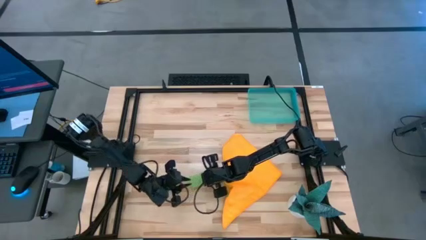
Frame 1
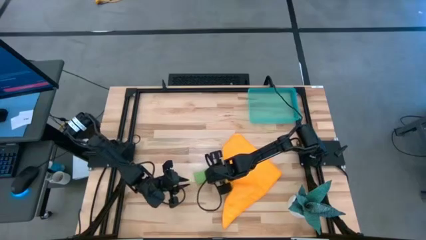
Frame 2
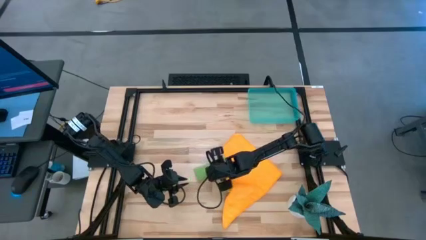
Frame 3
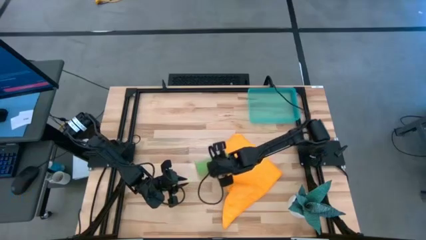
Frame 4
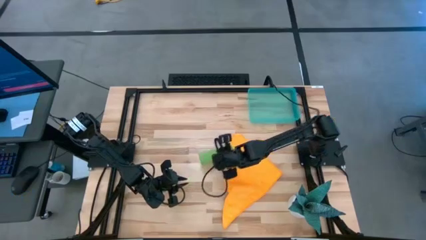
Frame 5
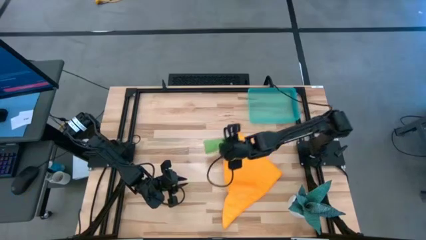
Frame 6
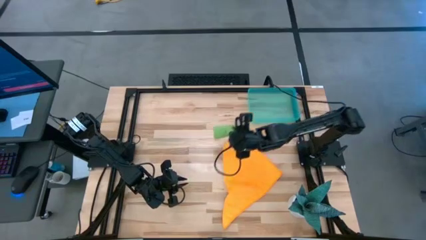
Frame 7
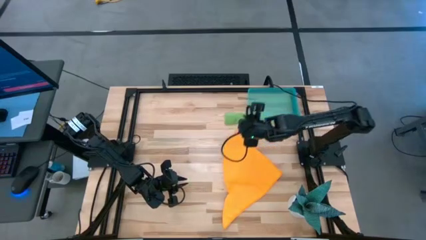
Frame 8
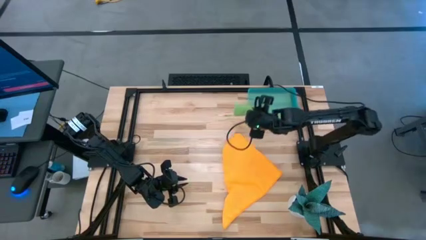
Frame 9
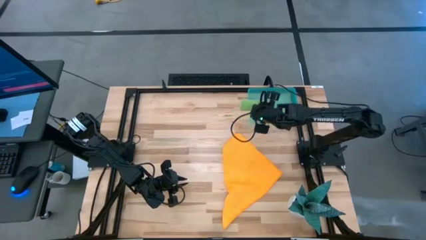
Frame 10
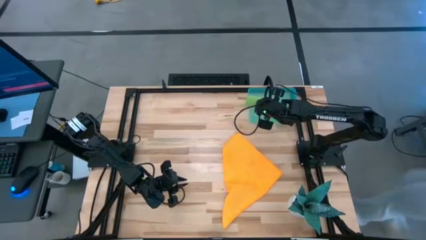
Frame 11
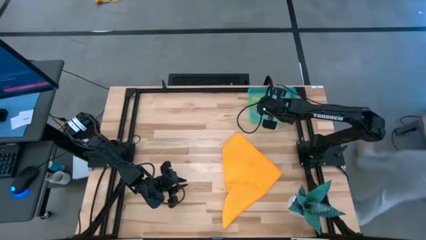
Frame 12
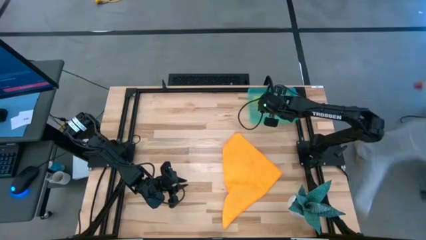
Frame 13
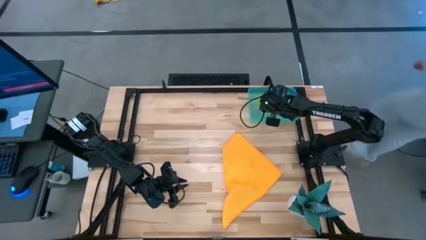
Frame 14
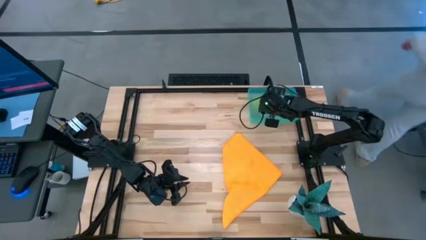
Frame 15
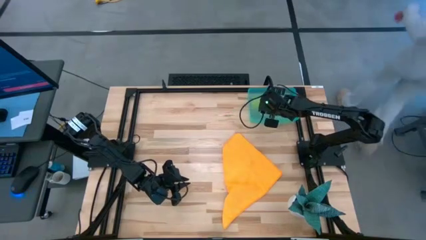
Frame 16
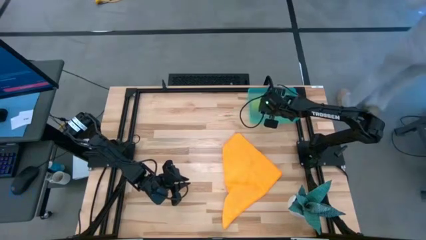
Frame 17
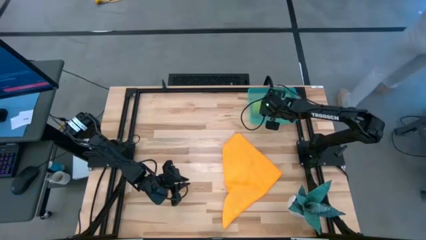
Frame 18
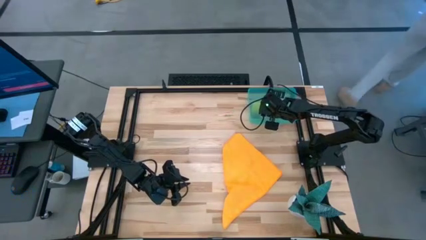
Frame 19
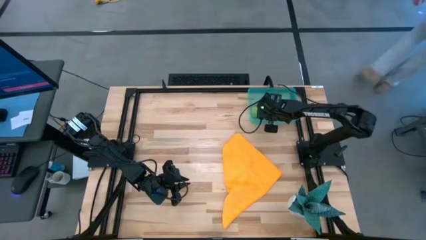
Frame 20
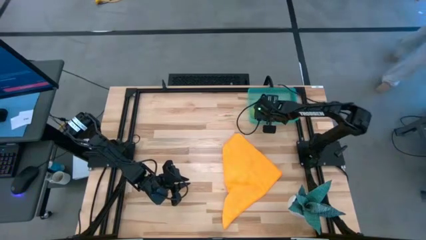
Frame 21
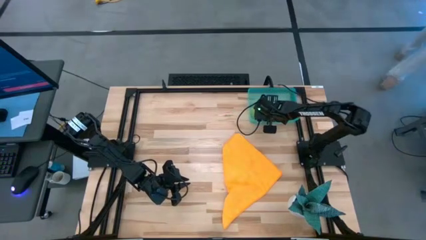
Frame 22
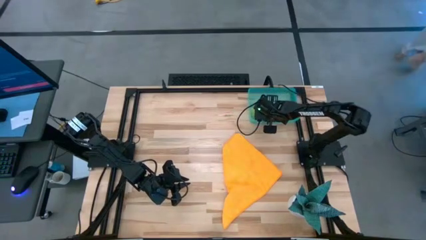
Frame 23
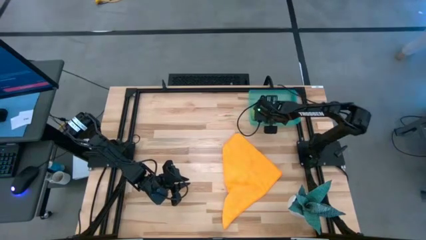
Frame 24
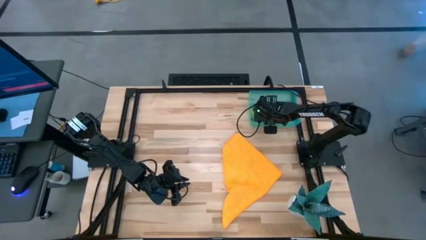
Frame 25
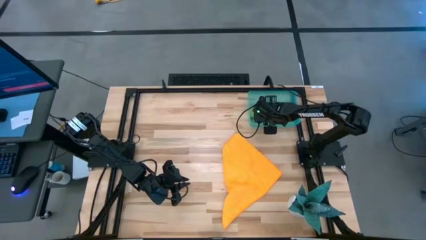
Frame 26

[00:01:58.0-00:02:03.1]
Task: Roll microfiber towels into tight, uniform cylinder then place into a basket
Put the green microfiber towel into the blue bin

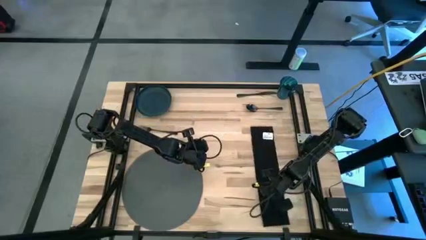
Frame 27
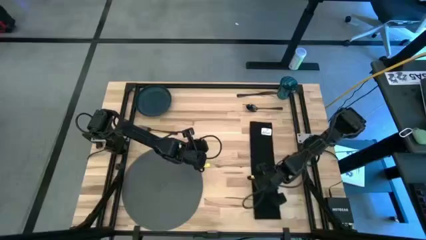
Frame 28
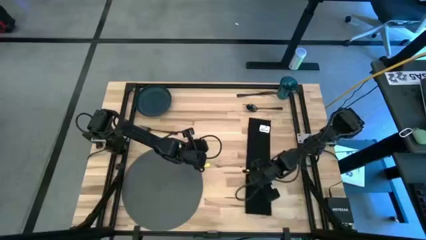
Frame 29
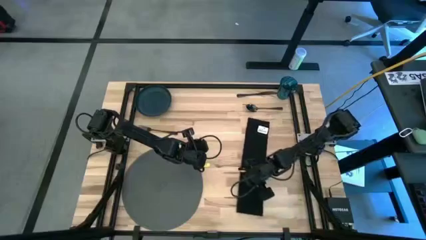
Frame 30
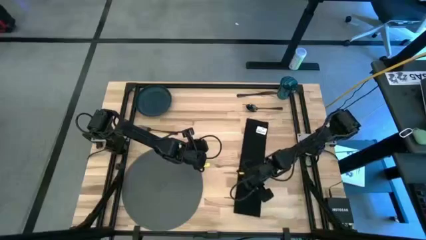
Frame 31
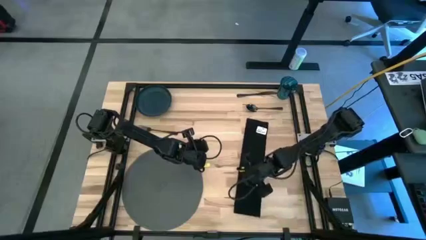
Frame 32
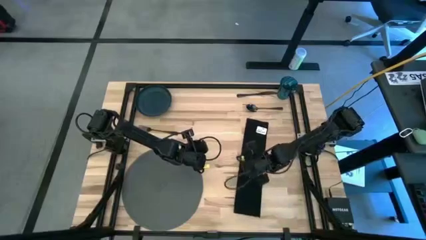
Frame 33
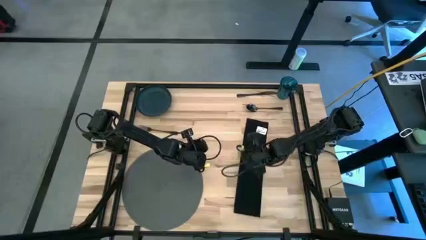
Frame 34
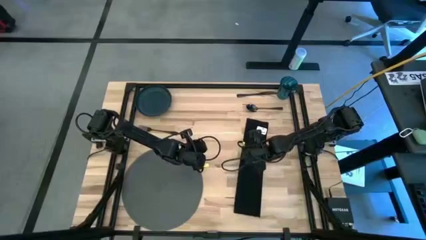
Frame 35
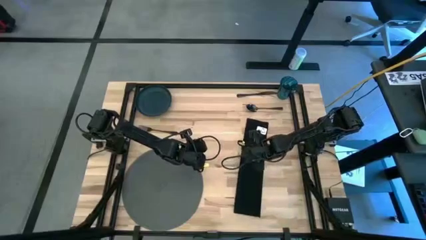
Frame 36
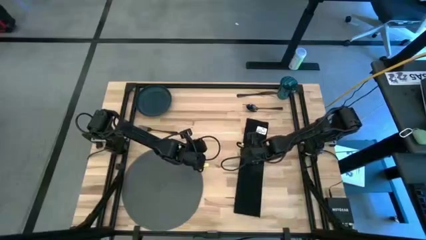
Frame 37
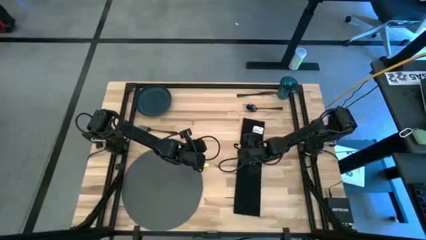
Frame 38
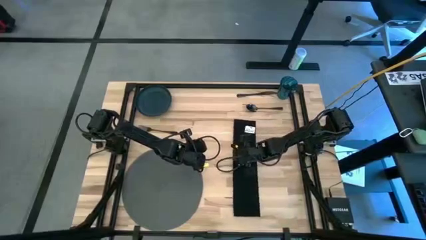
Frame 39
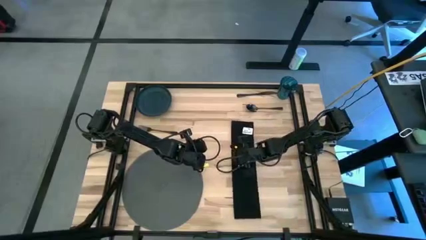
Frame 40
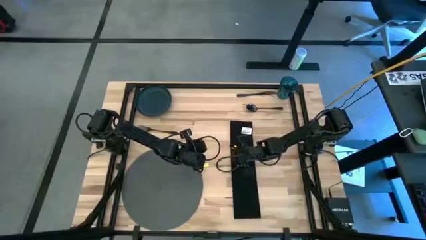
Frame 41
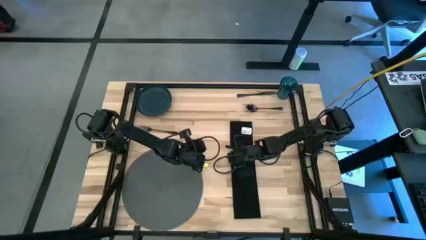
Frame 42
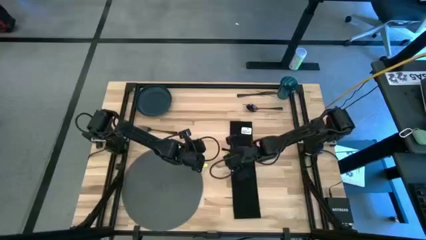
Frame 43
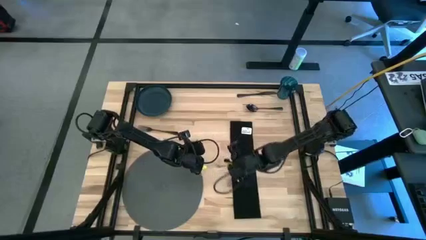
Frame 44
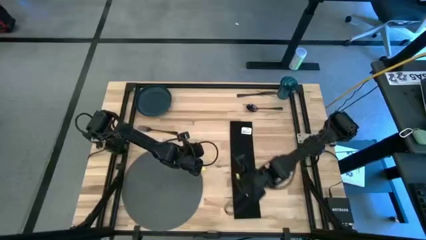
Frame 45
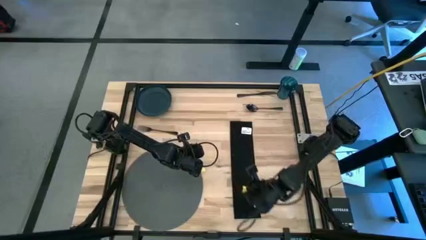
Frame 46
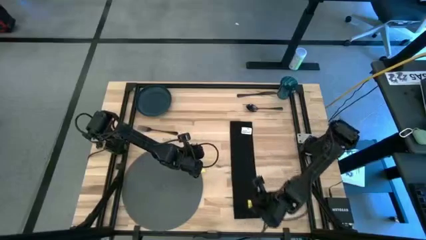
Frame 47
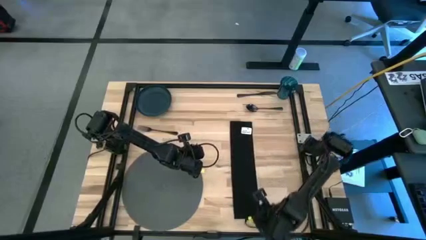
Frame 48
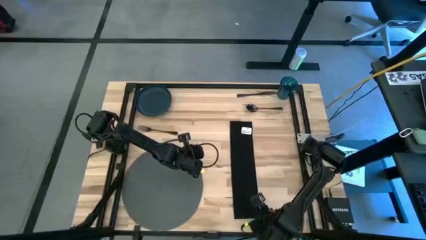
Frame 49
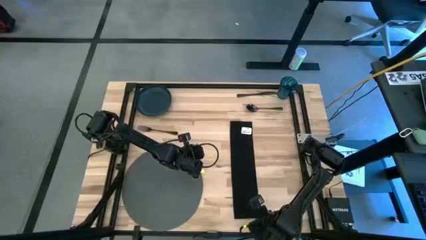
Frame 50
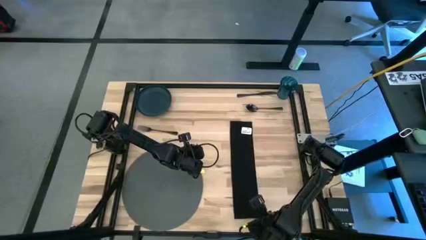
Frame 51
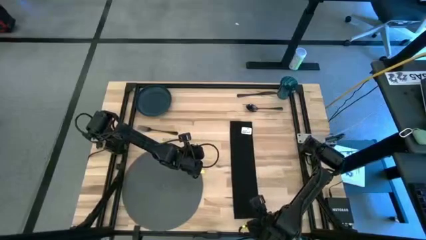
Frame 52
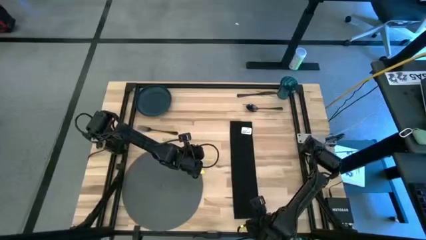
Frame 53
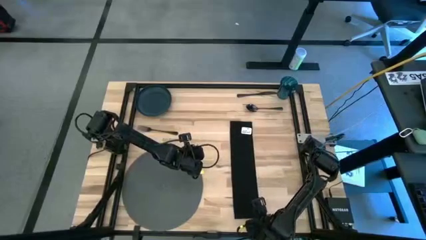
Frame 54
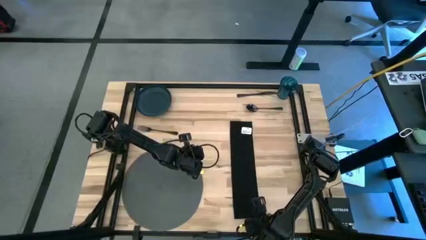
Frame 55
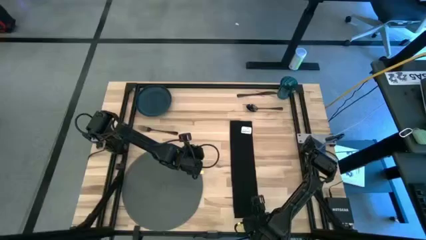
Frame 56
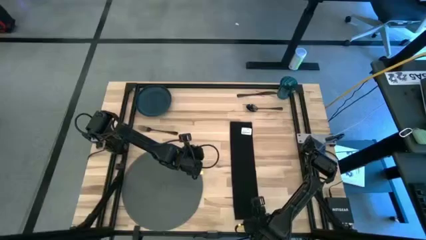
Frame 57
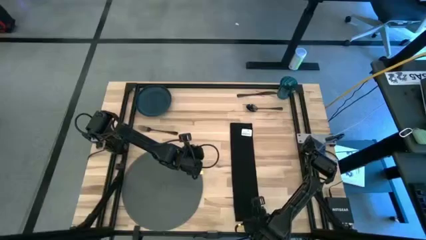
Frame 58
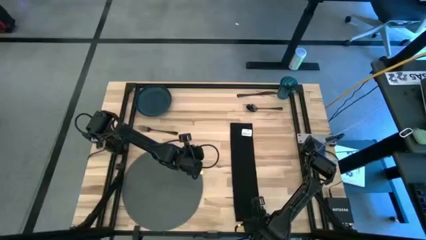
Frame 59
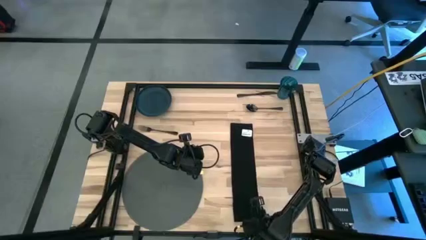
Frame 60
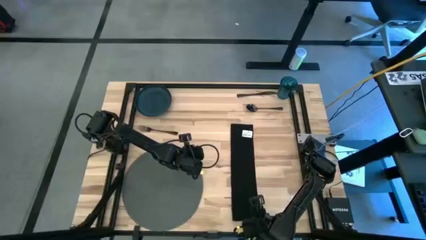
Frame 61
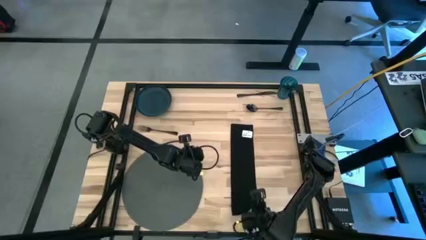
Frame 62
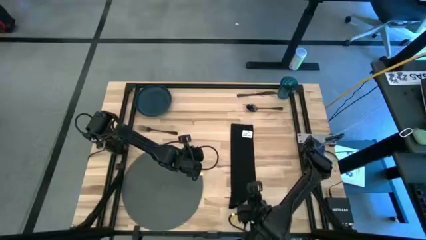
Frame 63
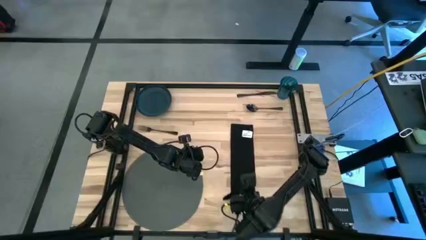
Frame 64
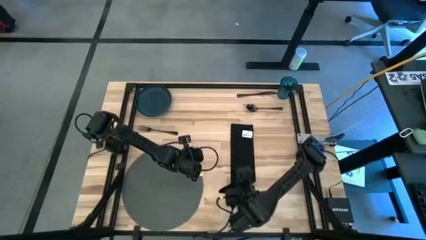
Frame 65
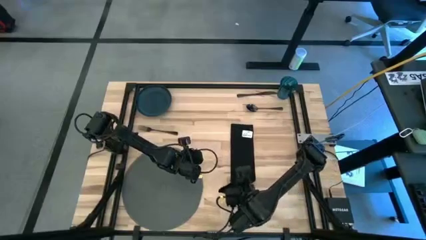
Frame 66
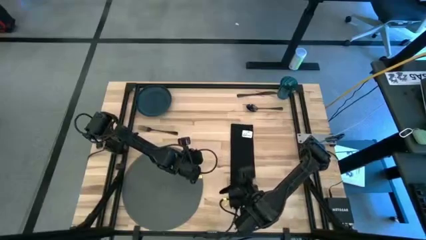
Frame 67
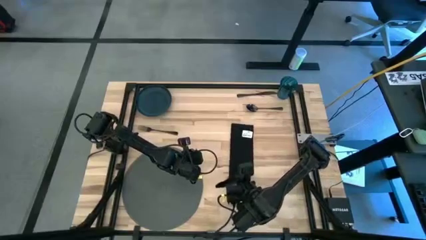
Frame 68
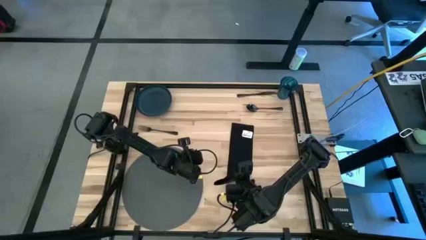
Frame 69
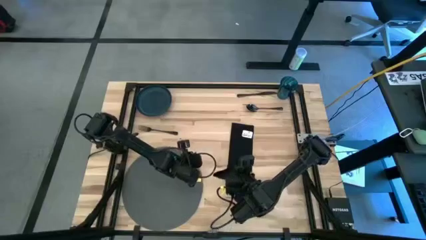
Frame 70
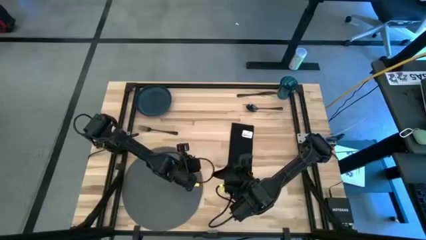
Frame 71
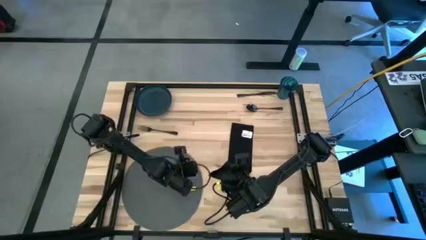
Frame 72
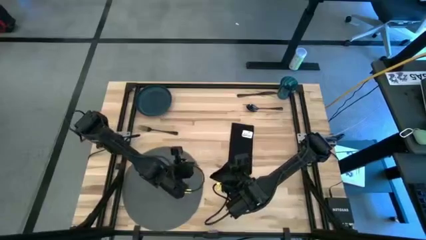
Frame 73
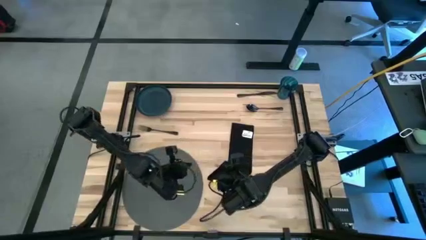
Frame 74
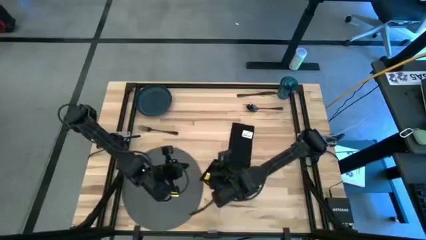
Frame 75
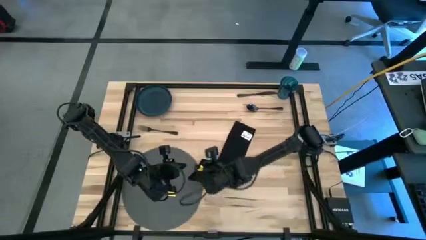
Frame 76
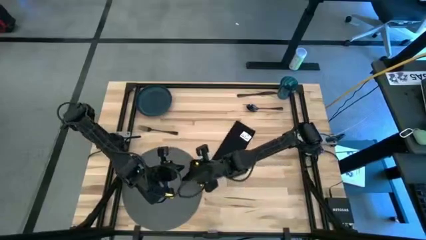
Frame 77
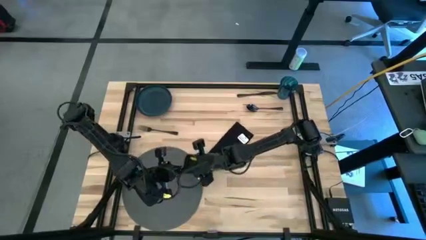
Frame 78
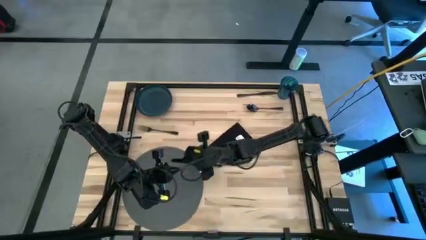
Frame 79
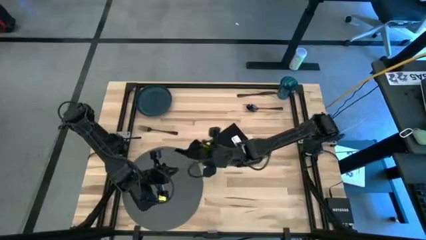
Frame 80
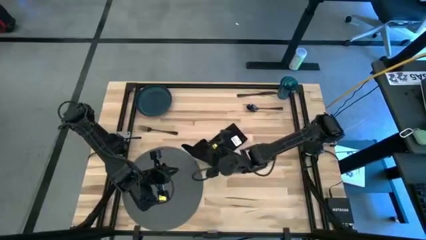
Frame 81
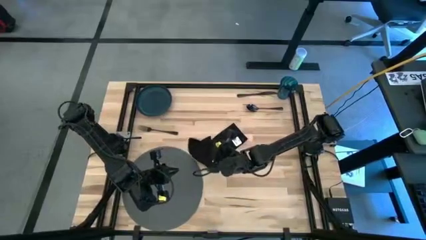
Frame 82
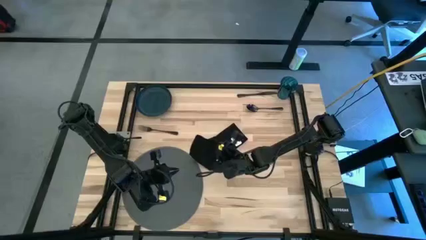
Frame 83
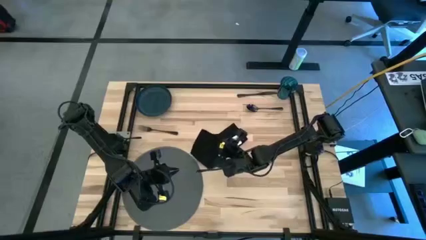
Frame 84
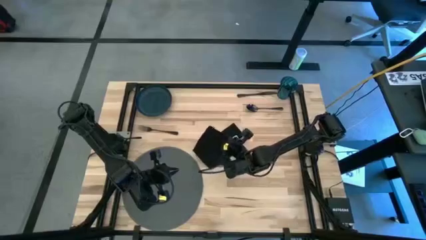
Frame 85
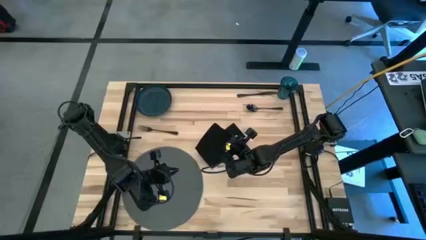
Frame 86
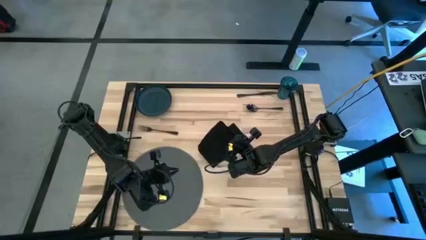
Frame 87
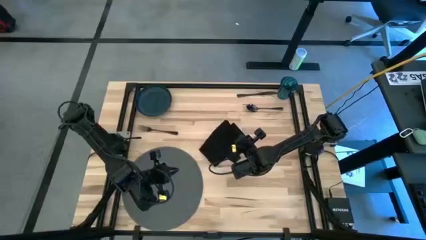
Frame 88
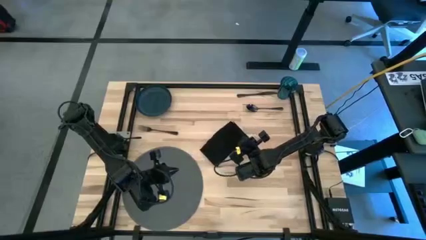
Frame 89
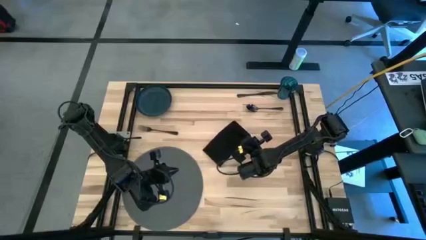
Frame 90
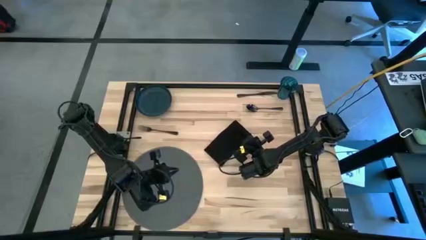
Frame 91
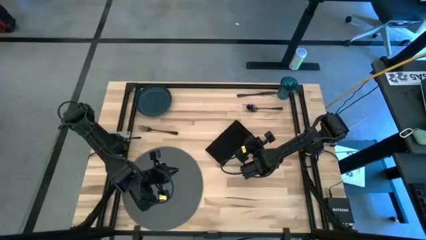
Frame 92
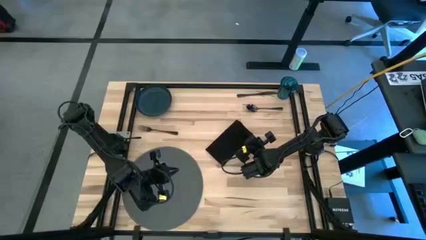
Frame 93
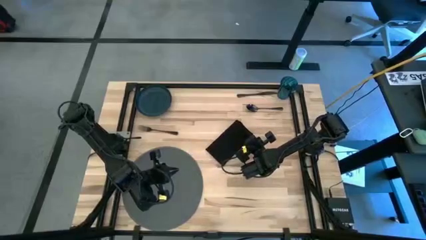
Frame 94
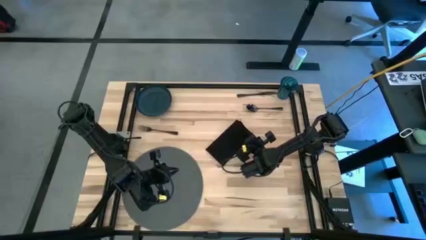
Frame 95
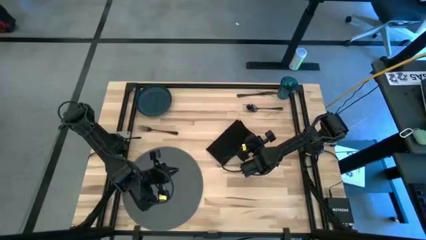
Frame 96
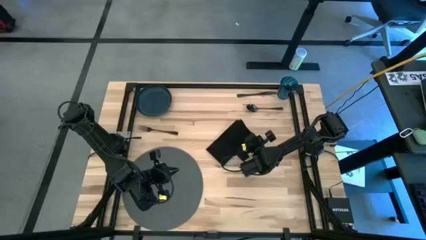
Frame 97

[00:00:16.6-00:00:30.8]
Task: Set table place
Fold the black table napkin
